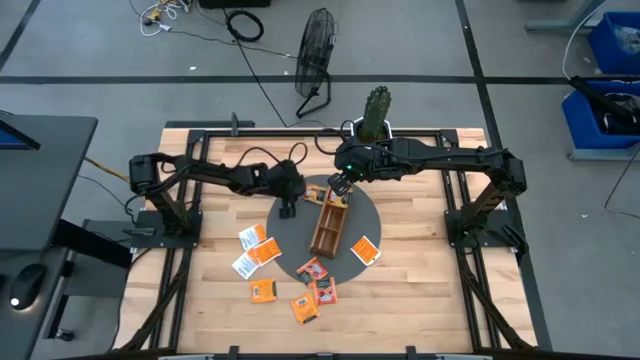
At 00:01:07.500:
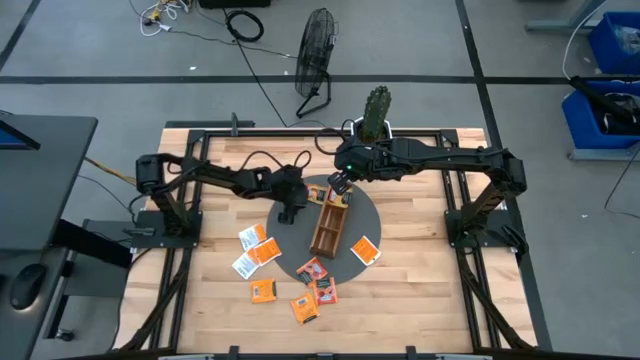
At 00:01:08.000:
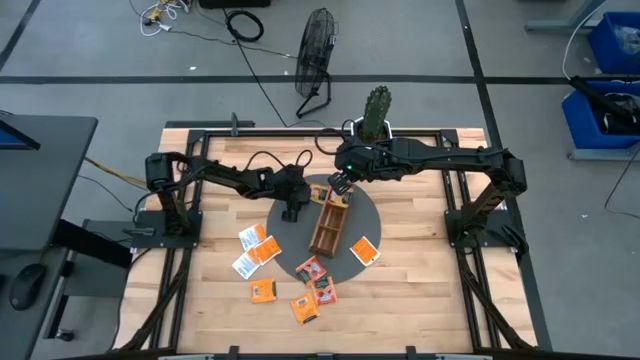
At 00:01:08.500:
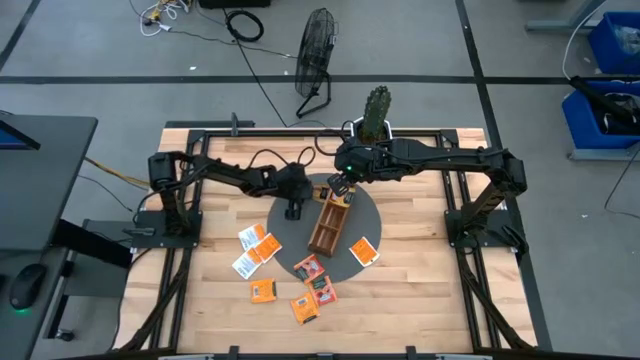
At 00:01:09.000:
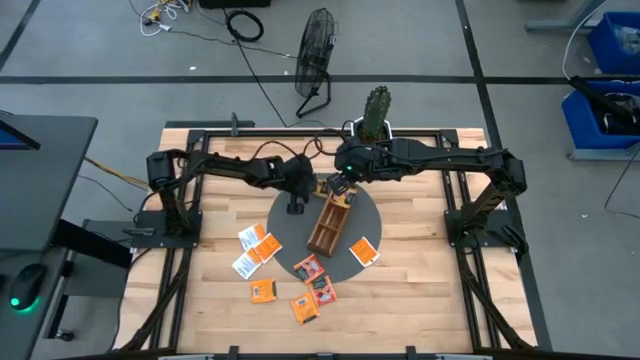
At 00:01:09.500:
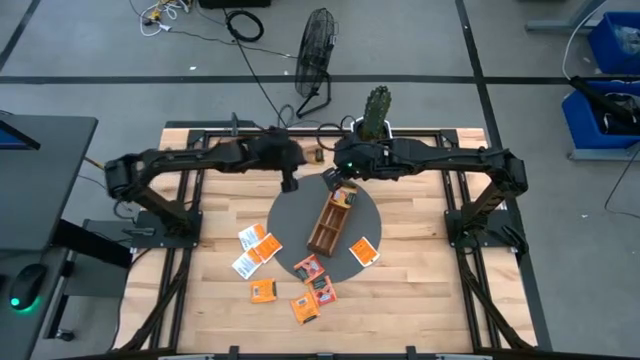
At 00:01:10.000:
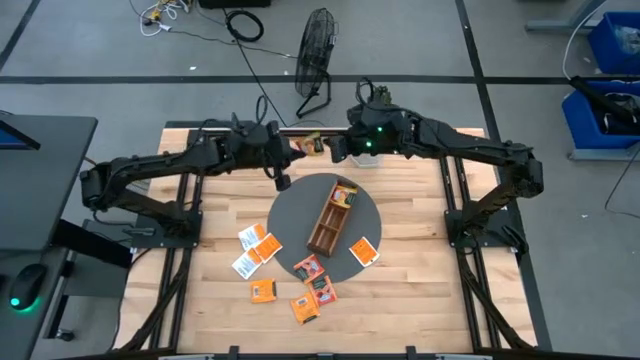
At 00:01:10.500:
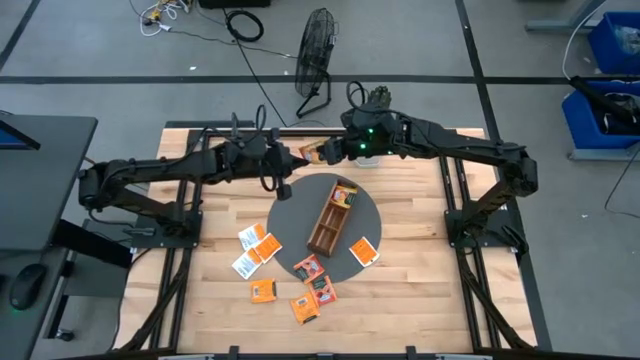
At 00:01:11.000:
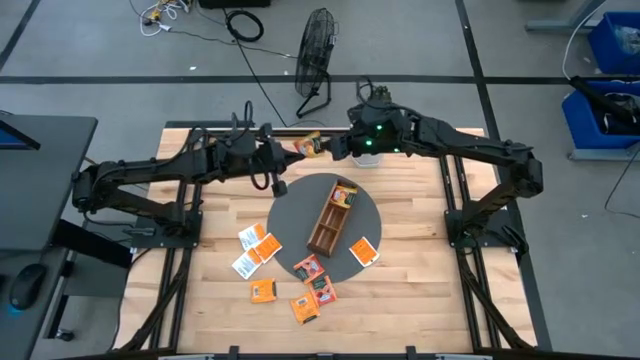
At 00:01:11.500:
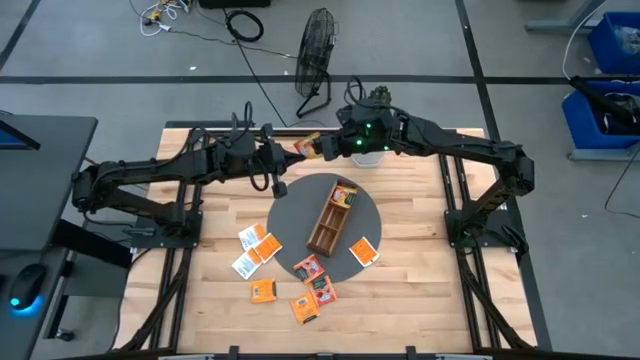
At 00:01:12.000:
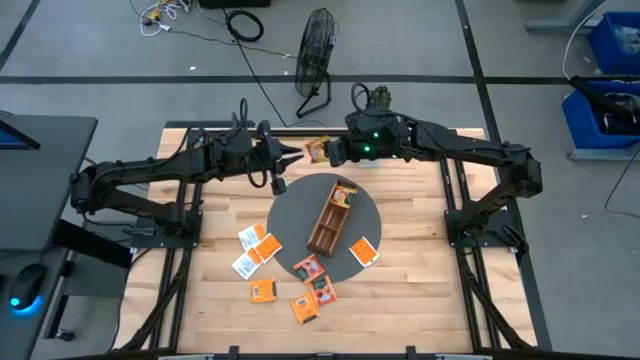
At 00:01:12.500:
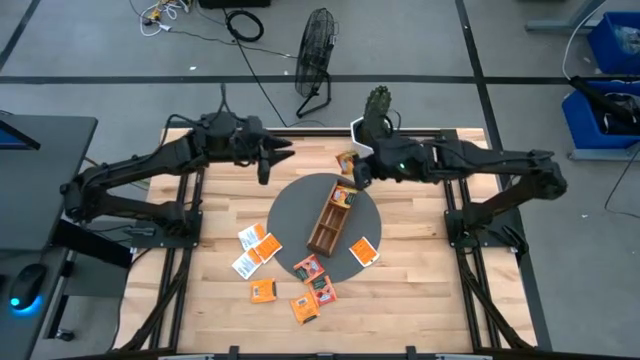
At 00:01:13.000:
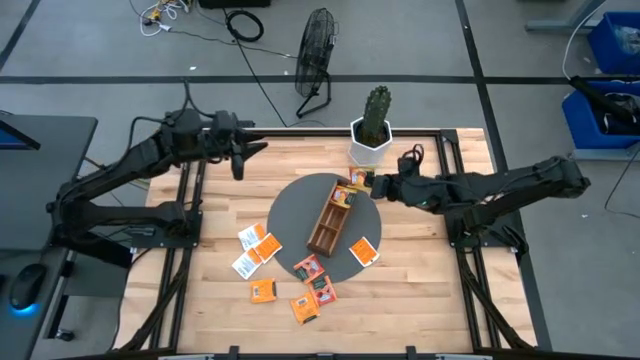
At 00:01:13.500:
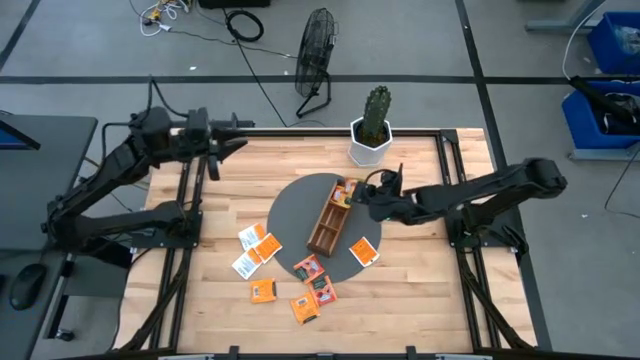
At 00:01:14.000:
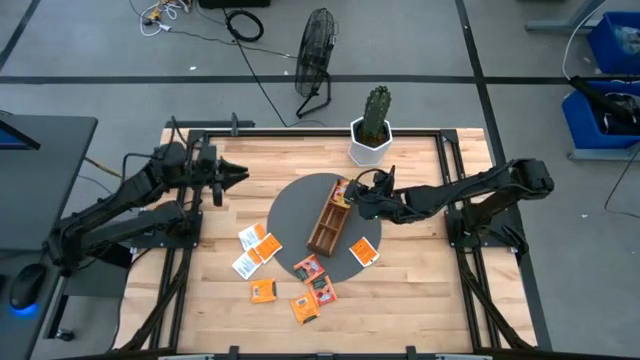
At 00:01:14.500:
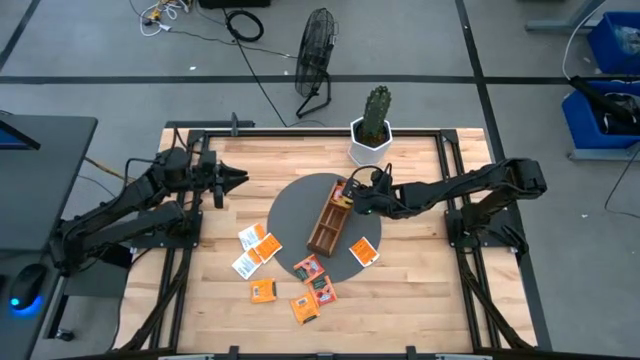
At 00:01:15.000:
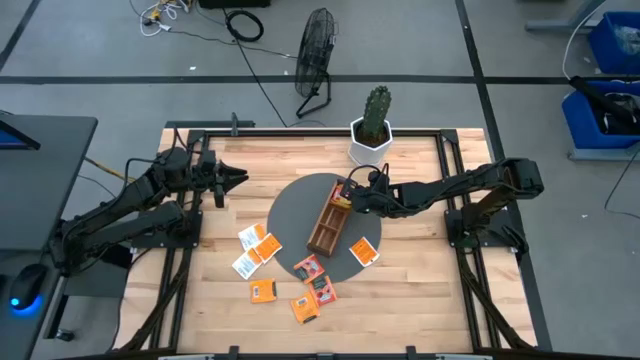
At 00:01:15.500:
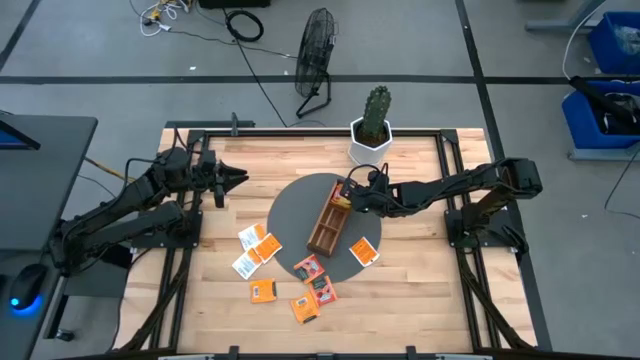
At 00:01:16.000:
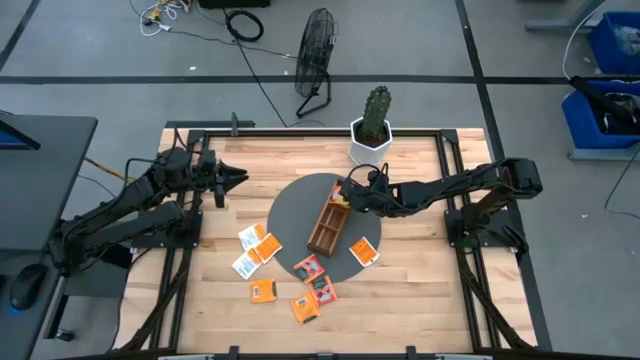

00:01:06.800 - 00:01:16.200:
Task: Pick & Place Tea
Put the orange tea bag into the top section of the wooden organizer

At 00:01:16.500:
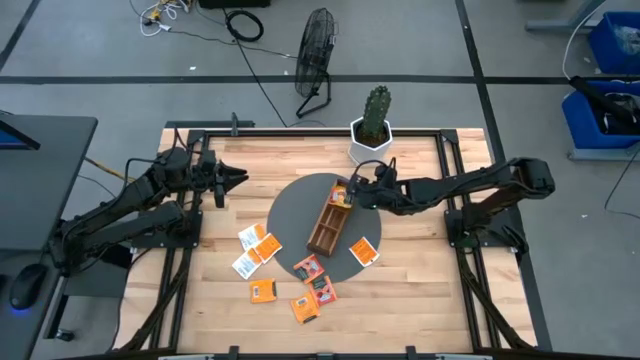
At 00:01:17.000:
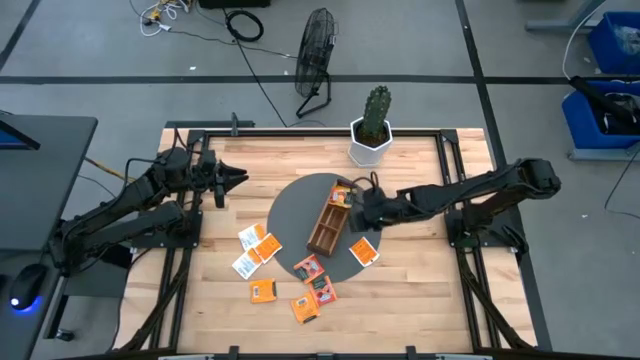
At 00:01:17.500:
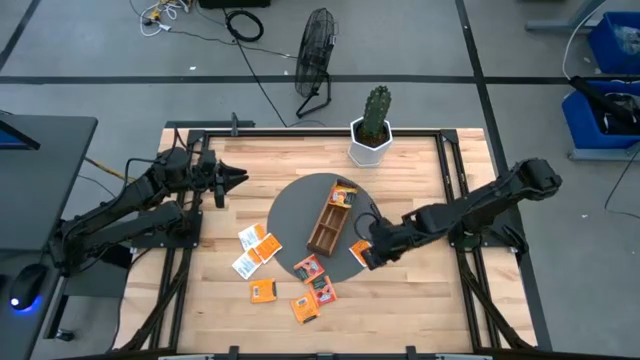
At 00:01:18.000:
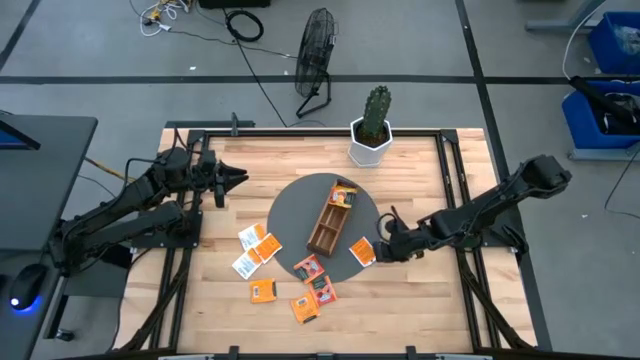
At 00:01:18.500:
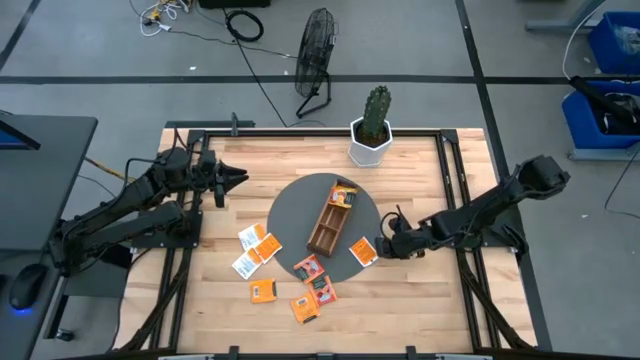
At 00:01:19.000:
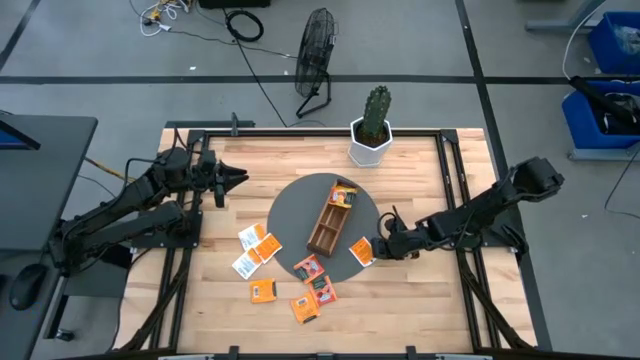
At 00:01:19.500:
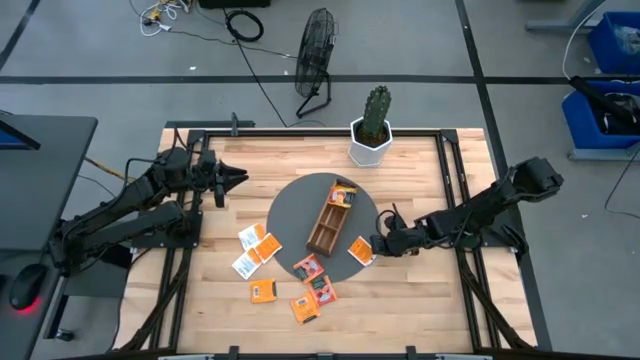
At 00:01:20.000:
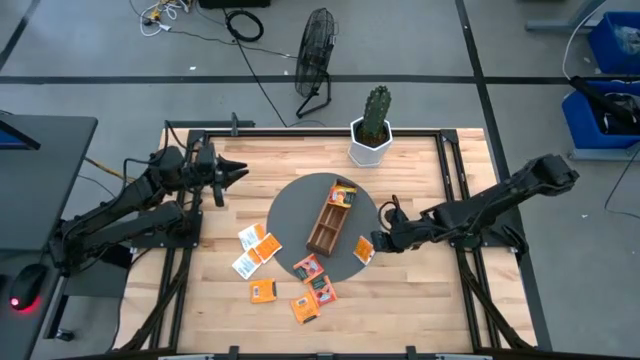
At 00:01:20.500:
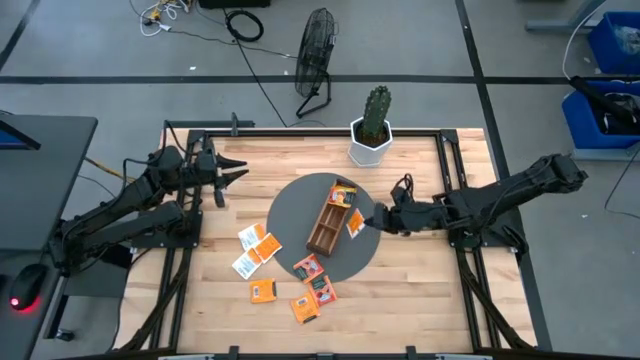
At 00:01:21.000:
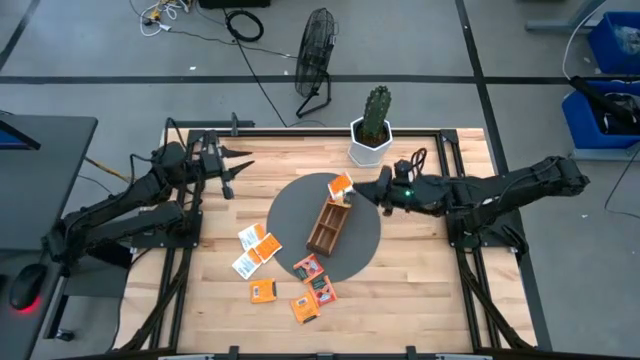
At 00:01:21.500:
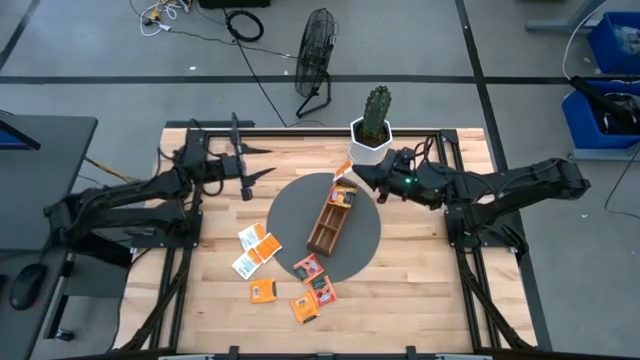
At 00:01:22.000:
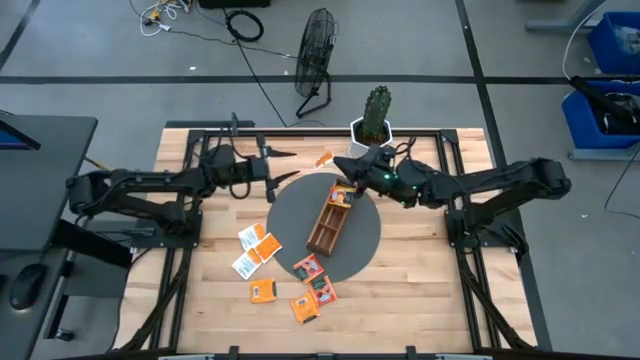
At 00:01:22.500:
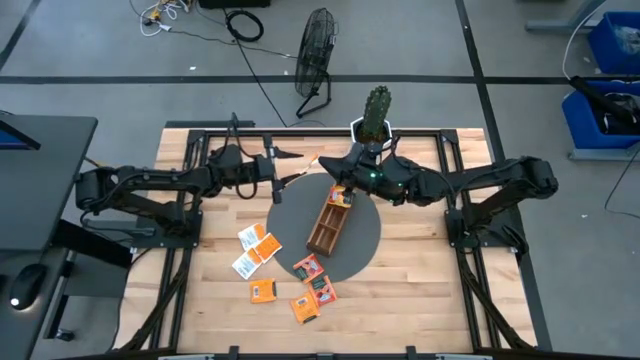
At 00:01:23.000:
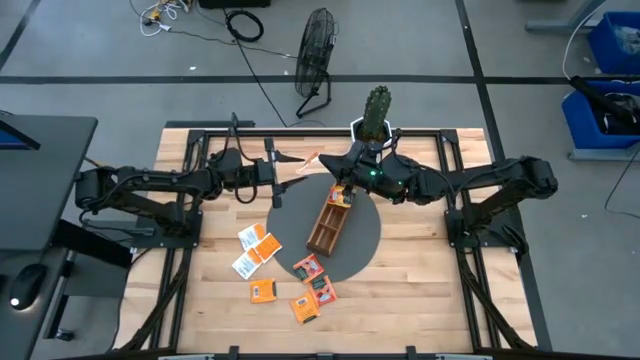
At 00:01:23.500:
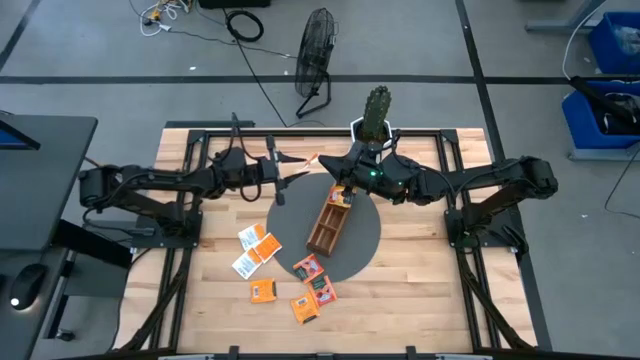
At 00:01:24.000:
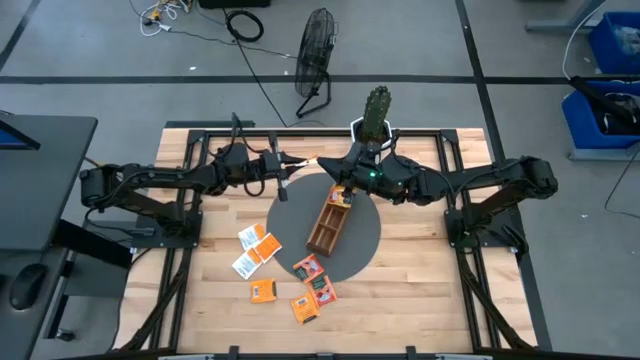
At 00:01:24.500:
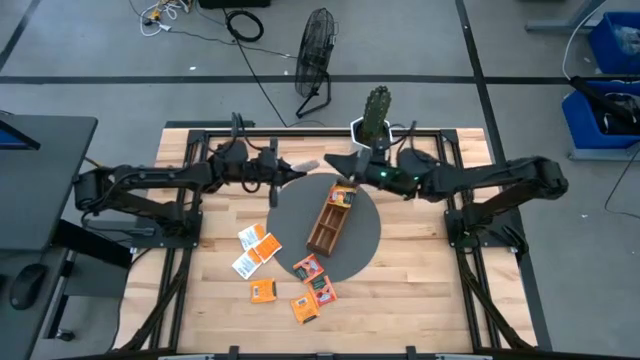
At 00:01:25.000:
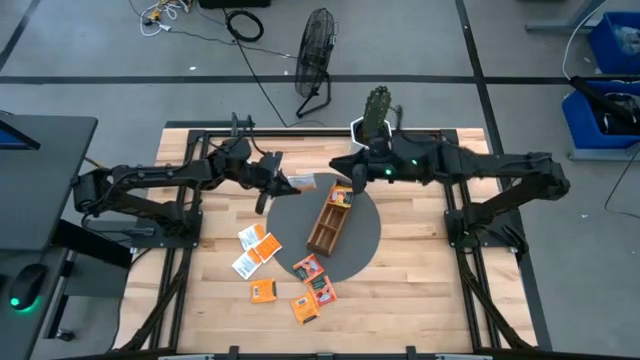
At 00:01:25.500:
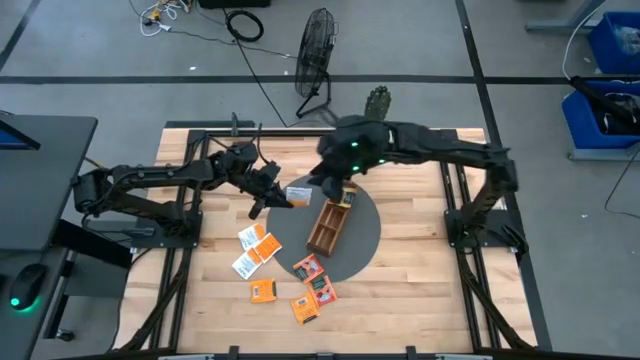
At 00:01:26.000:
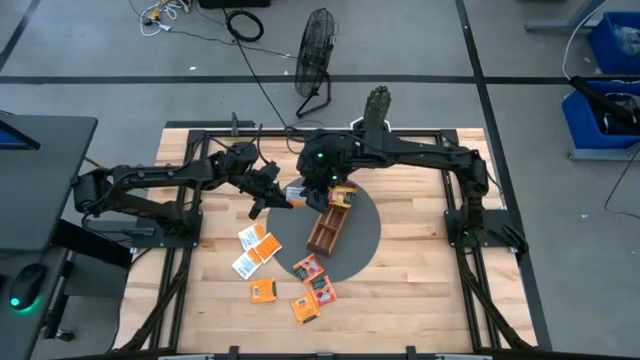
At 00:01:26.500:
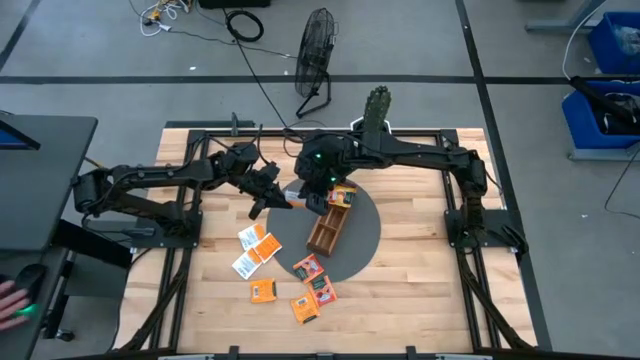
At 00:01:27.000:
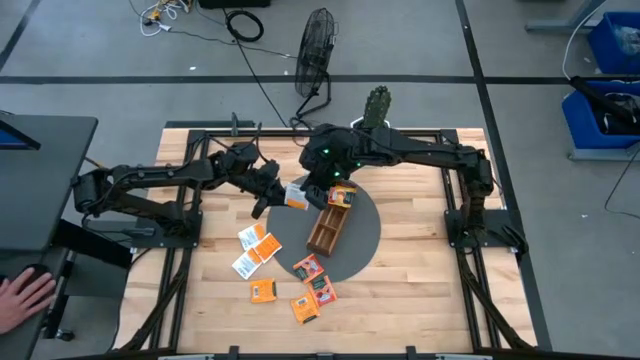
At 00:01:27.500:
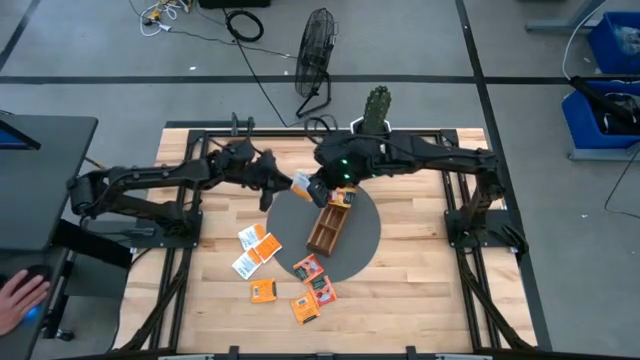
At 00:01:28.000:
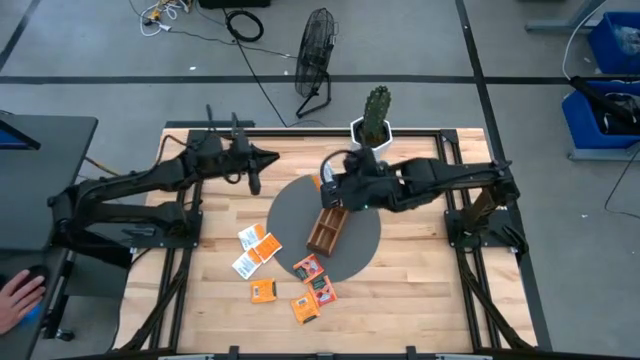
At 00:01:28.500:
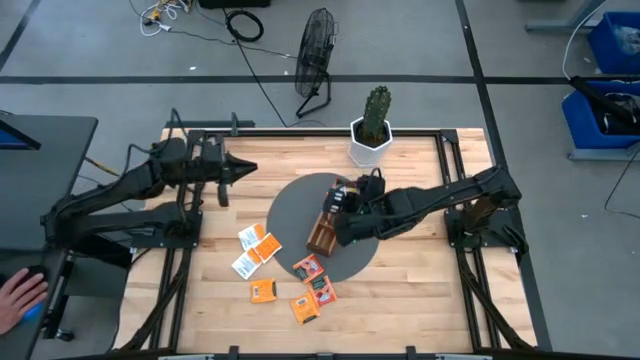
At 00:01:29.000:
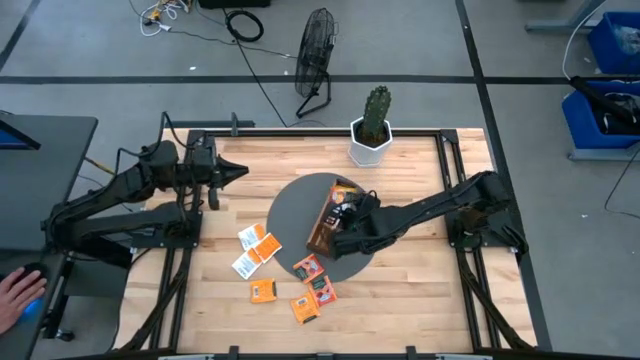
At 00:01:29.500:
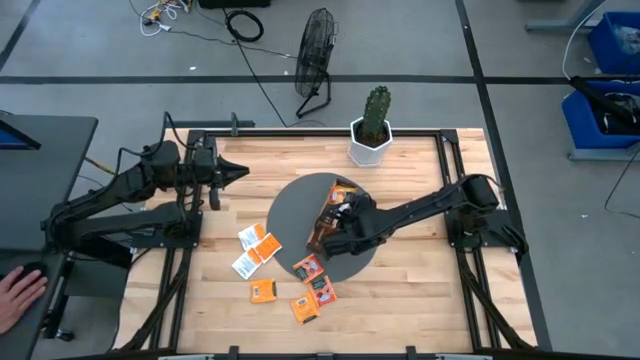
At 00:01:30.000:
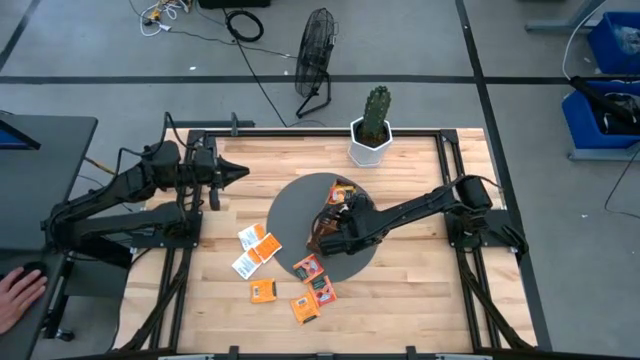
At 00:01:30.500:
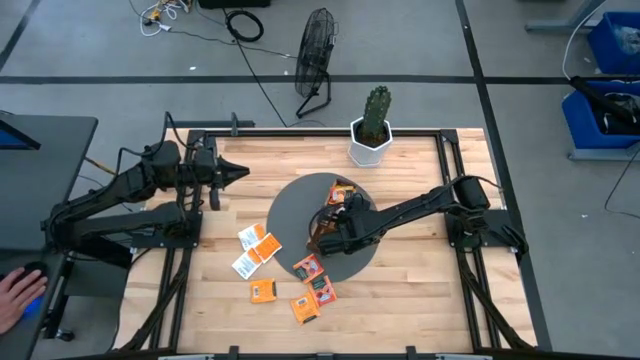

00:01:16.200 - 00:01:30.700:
Put the white tea bag into the middle section of the wooden organizer
